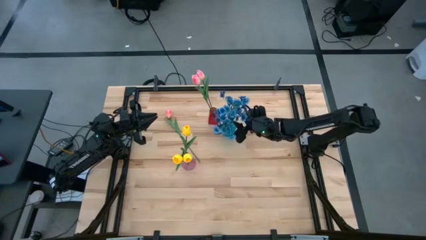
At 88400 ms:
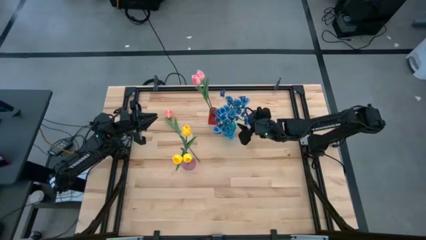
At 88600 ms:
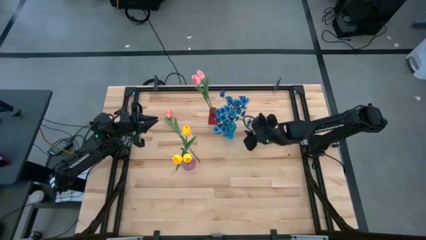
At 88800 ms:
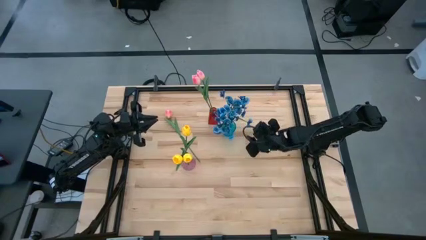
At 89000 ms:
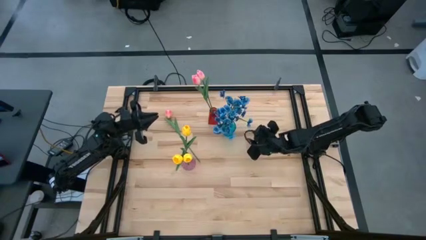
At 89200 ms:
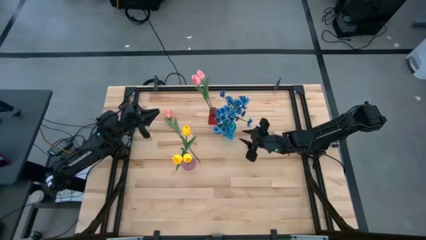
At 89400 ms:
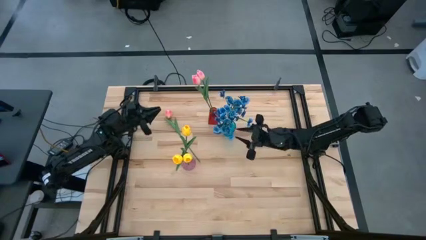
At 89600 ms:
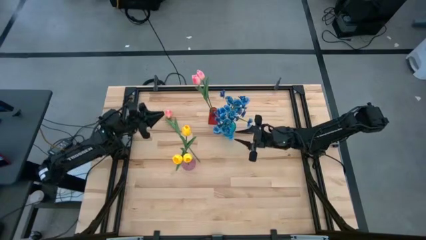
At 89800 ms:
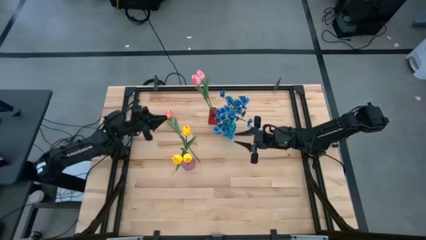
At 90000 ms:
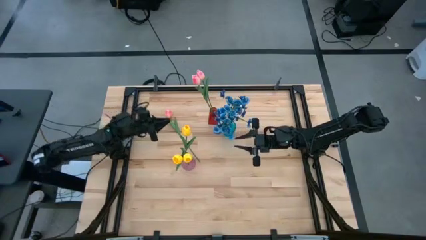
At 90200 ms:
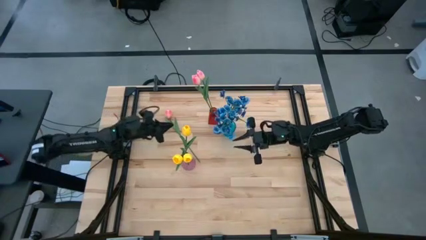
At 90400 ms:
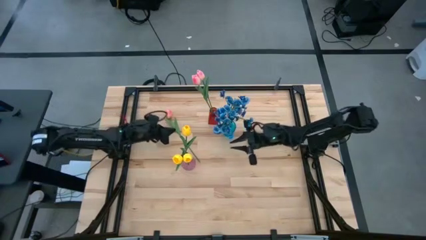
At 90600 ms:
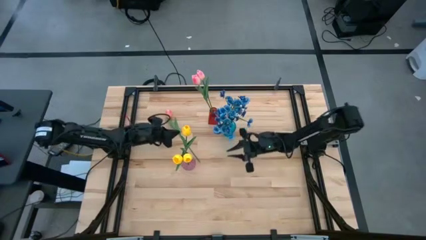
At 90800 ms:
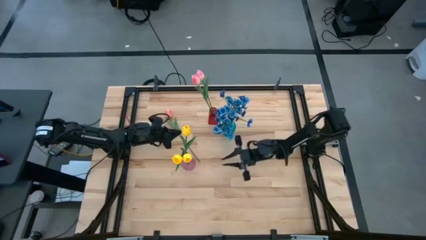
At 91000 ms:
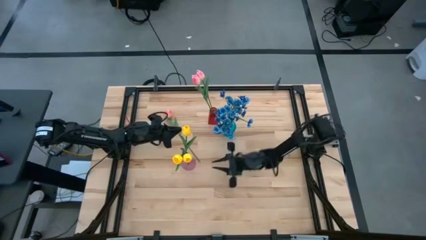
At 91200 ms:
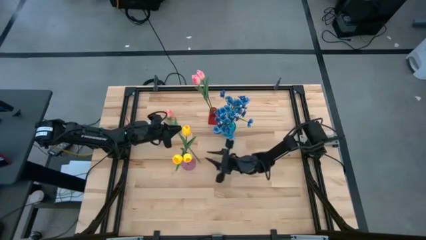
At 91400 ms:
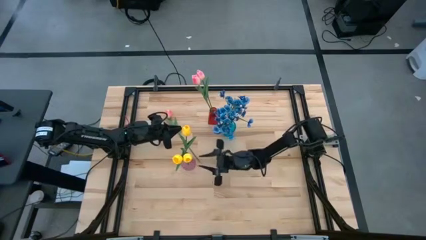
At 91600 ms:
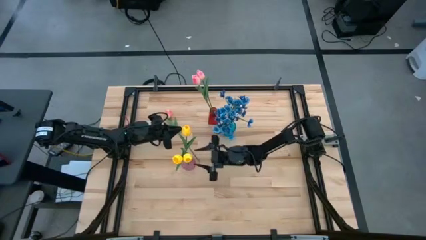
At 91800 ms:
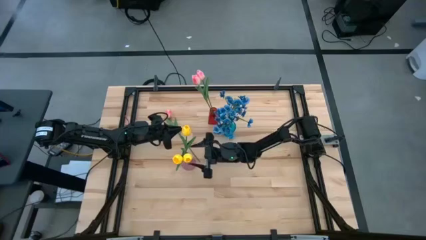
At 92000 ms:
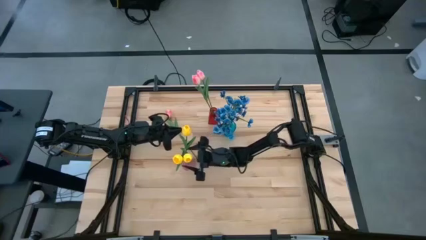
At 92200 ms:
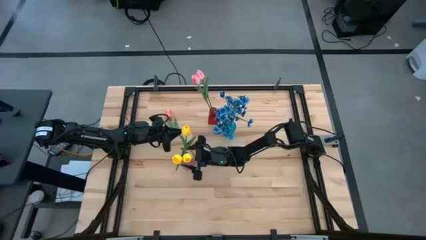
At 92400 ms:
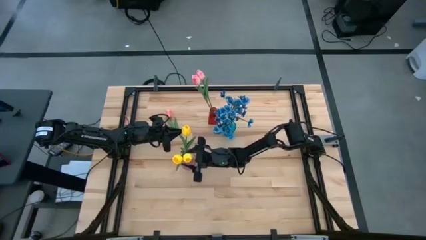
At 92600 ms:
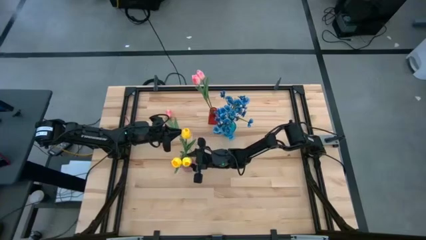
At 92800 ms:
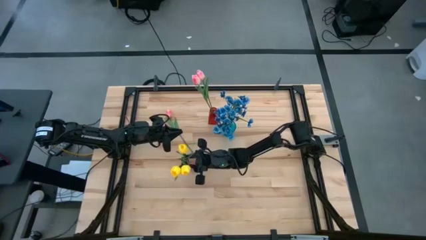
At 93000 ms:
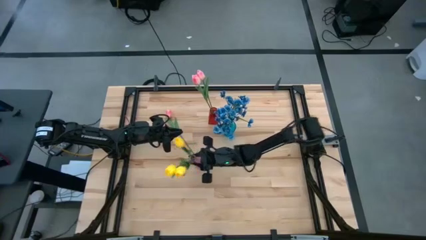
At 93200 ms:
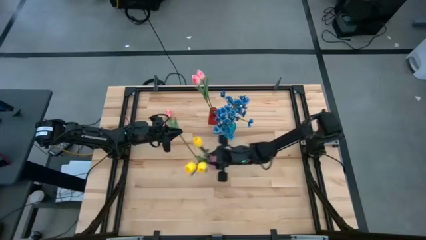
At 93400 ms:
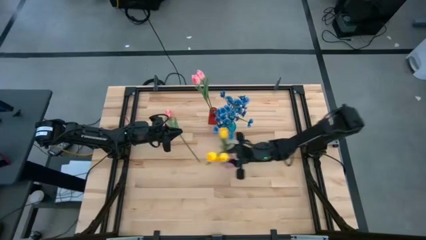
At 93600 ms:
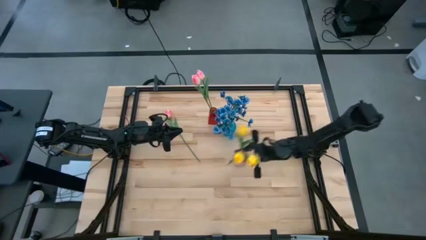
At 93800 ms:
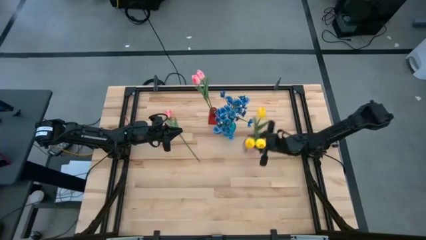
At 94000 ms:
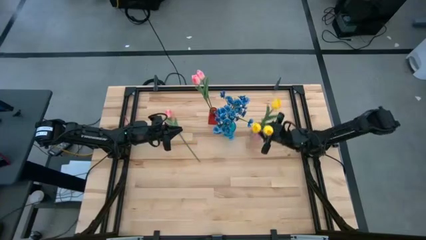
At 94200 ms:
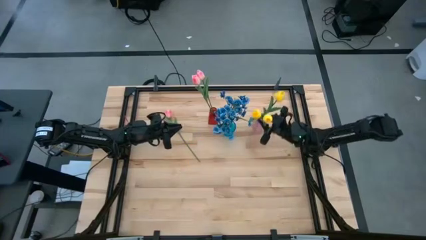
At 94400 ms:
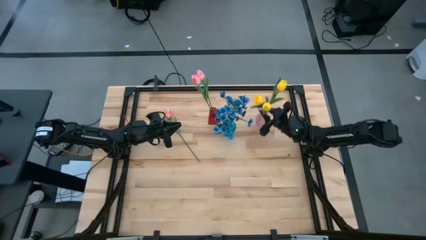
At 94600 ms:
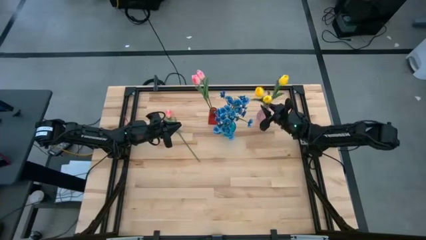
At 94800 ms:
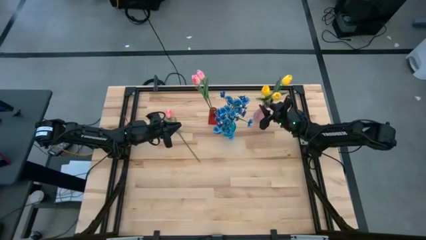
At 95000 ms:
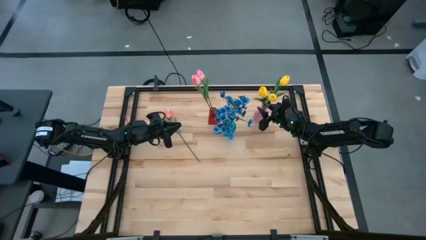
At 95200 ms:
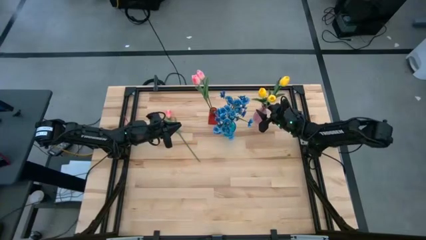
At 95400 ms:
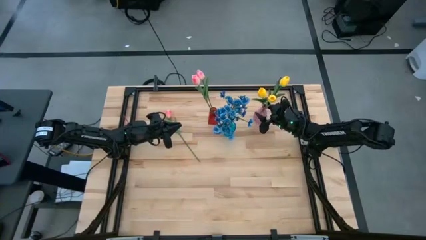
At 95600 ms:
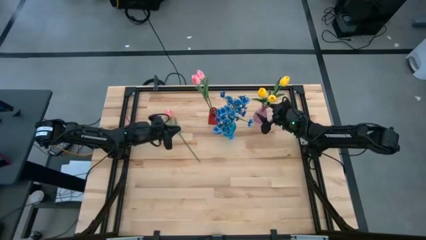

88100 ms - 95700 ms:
Task: Sort flowers into vase by color
Move the purple vase to the top right of the table

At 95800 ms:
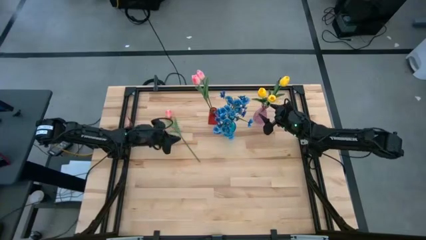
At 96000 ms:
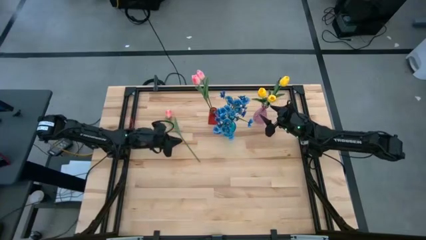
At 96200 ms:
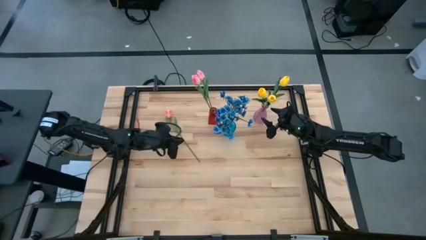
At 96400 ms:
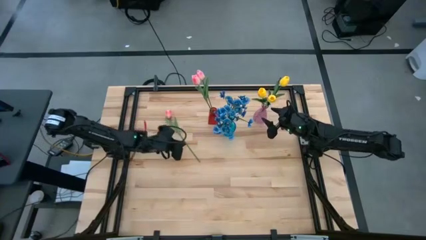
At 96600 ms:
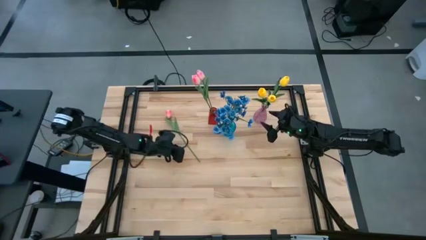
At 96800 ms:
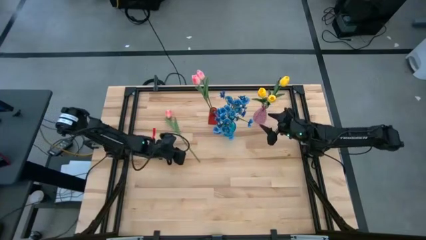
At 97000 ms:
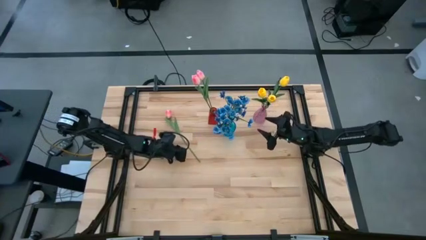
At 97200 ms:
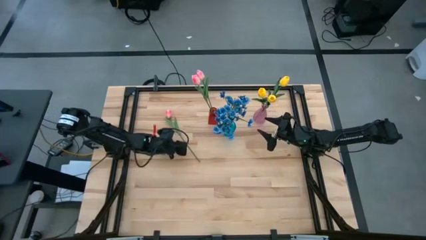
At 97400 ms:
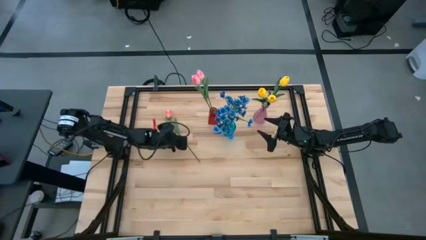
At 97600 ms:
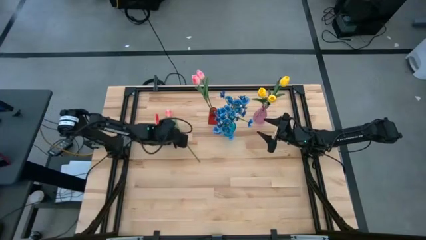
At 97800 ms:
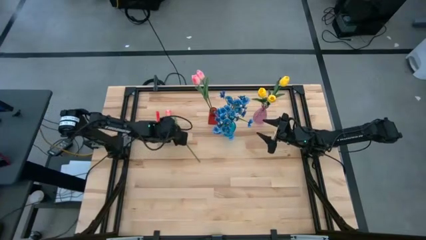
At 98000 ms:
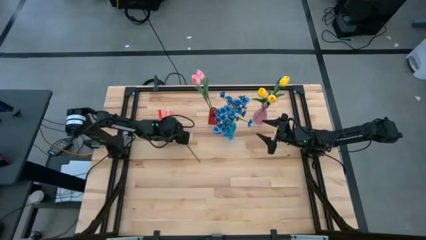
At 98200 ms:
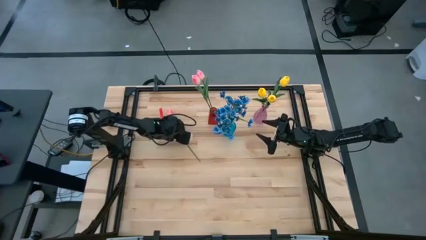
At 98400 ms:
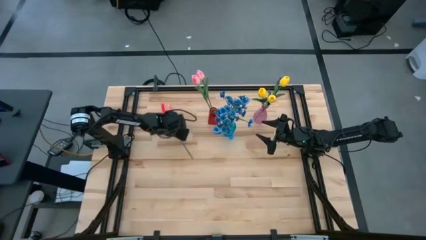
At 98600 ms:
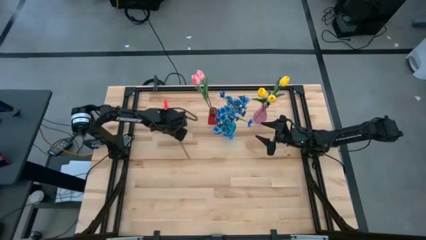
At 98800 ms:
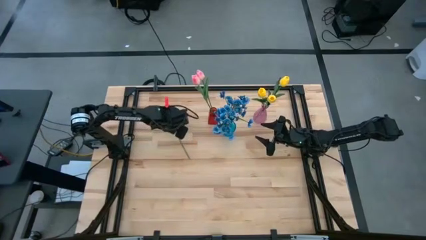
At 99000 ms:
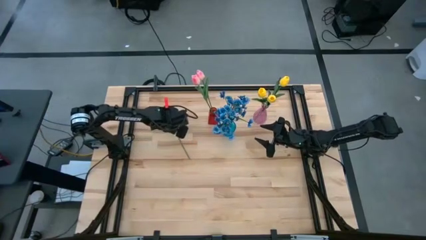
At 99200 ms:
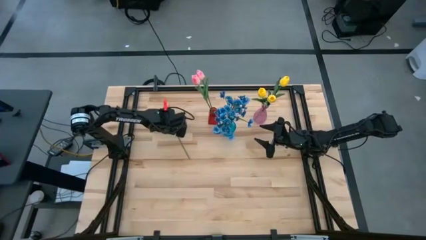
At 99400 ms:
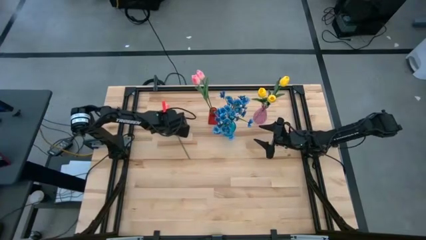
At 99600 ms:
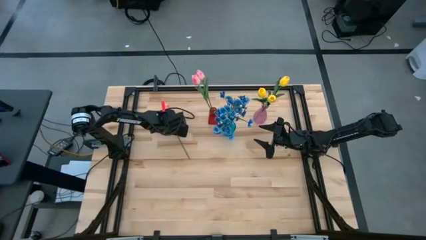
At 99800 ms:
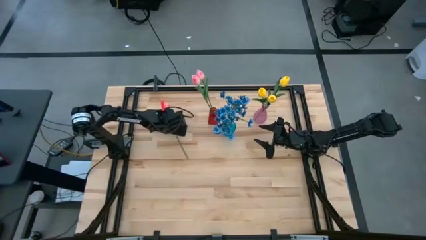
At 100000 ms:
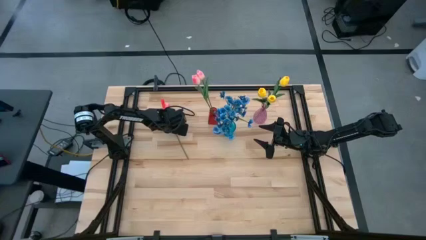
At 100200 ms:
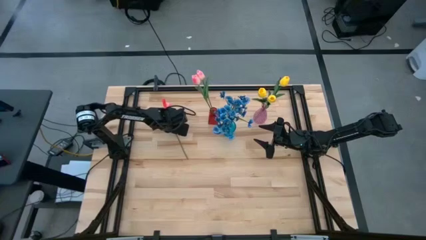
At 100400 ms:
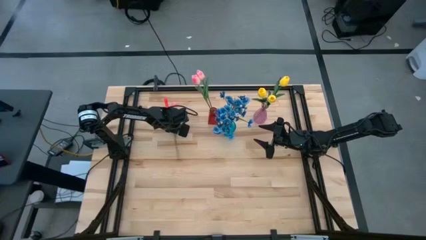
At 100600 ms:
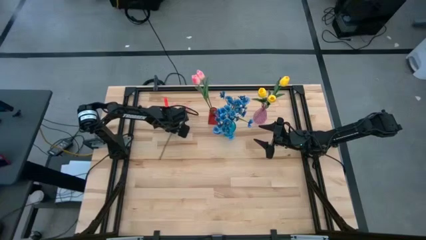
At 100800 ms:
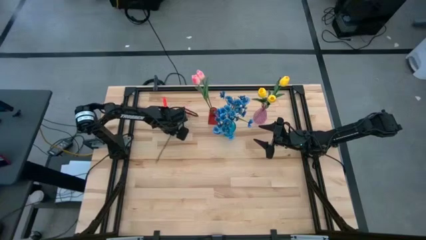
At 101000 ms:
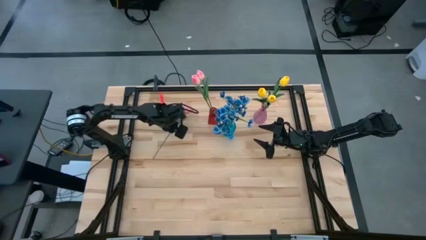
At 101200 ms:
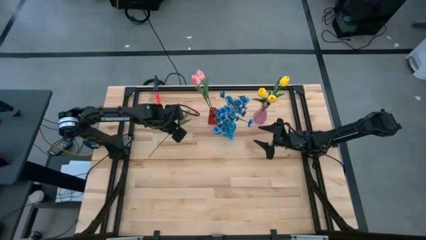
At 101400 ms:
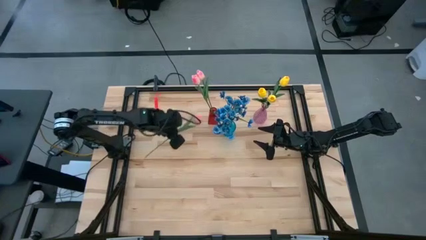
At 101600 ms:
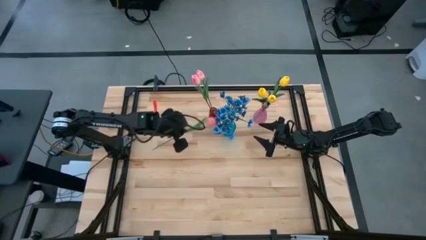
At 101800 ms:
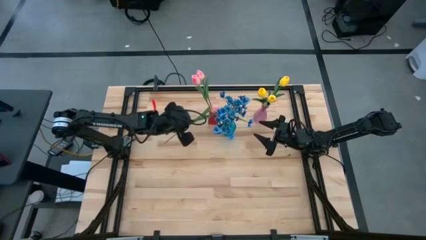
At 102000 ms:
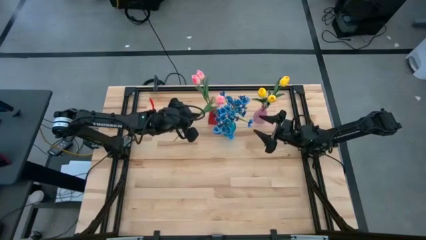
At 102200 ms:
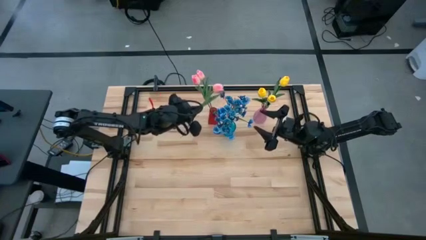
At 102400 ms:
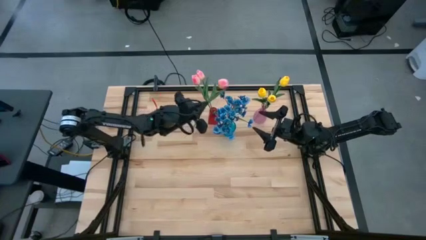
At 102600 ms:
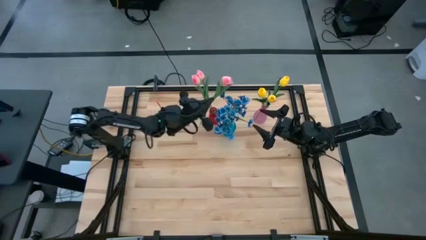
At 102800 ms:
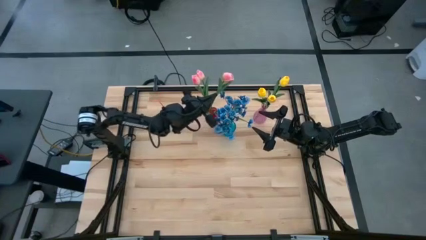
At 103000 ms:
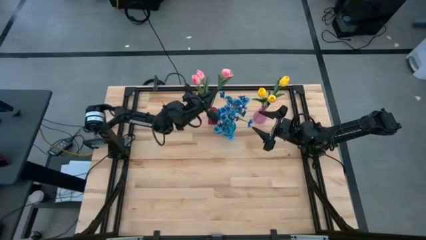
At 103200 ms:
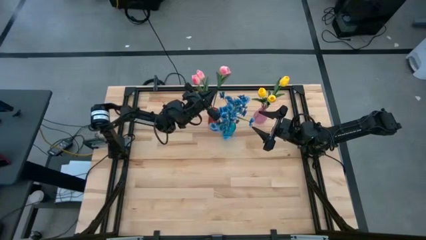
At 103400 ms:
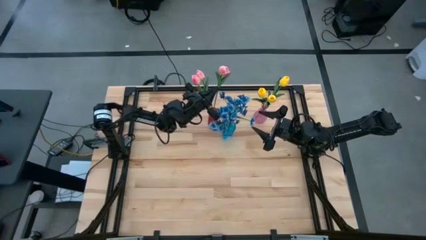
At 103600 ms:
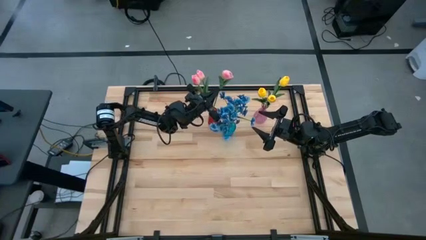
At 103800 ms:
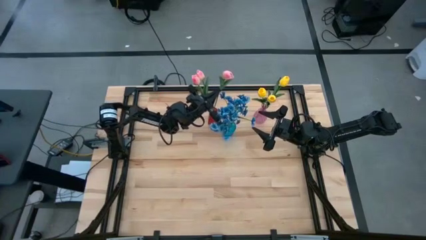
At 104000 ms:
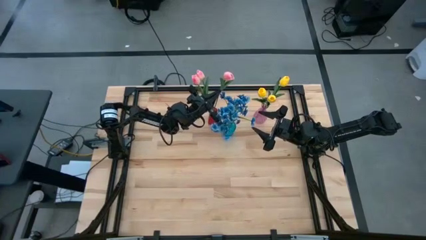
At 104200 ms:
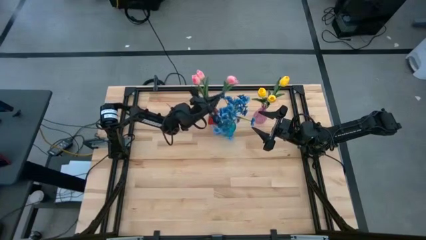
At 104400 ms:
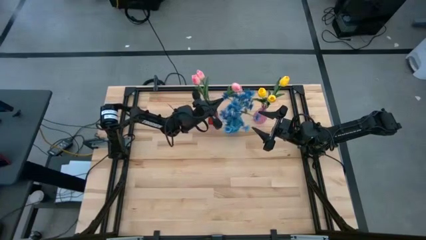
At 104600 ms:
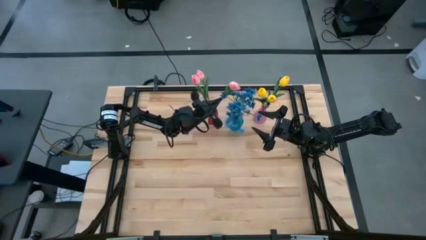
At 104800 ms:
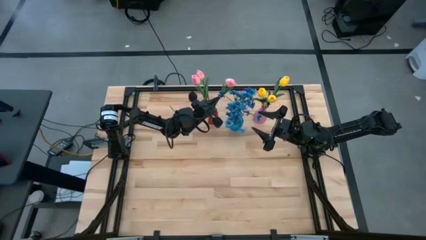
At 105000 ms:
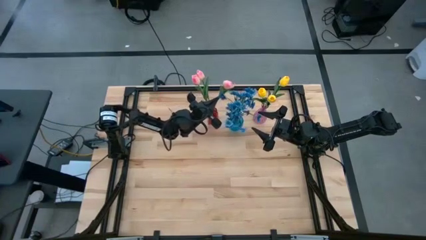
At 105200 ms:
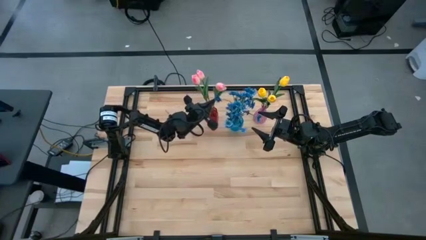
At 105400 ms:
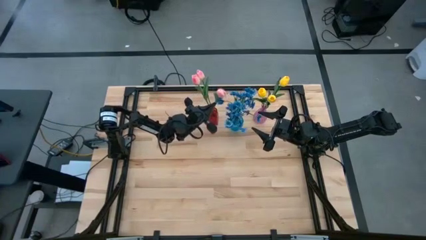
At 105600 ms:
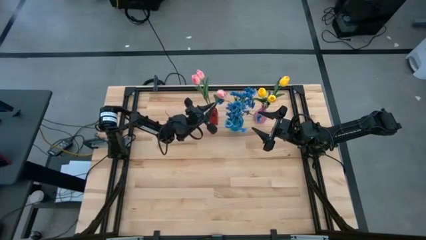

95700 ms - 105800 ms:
Put the pink flower into the red vase
